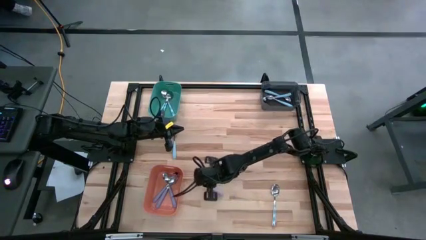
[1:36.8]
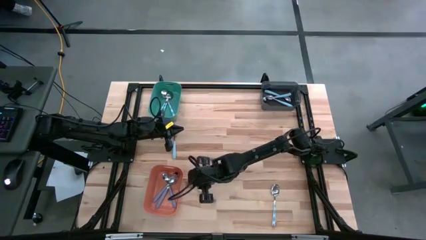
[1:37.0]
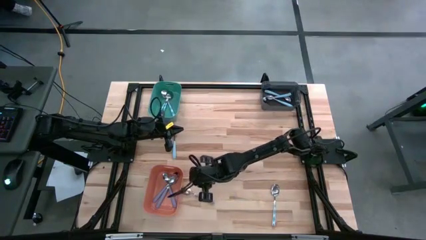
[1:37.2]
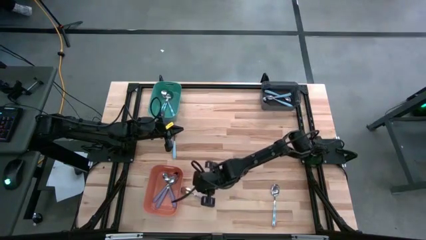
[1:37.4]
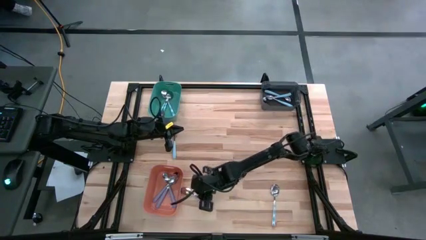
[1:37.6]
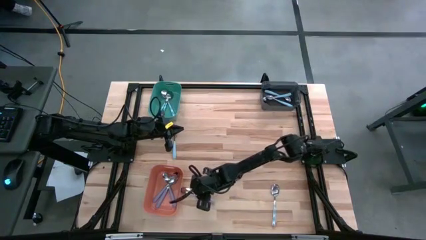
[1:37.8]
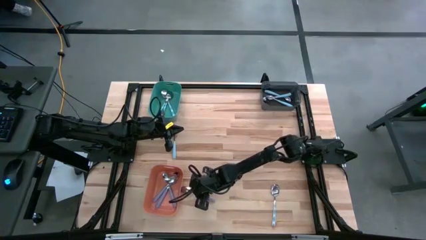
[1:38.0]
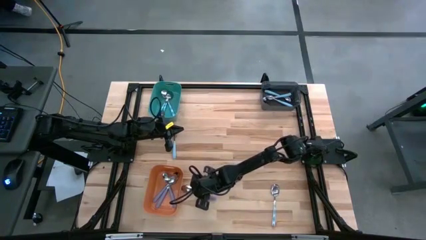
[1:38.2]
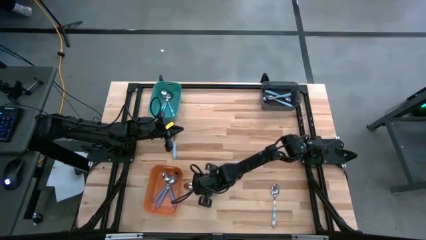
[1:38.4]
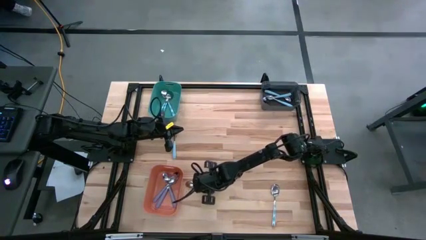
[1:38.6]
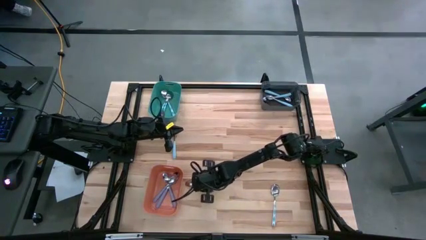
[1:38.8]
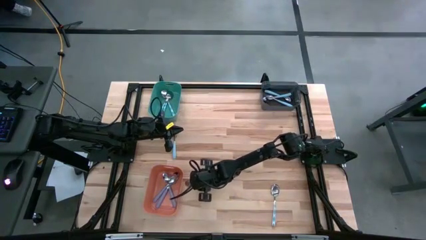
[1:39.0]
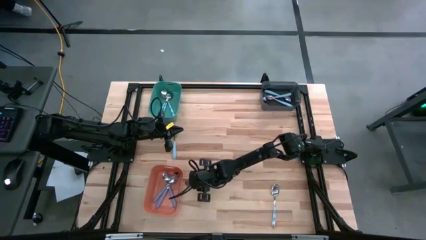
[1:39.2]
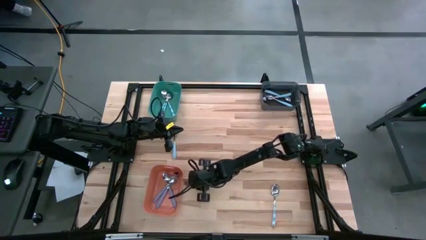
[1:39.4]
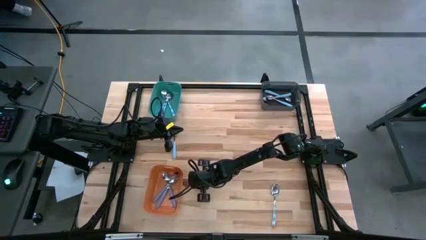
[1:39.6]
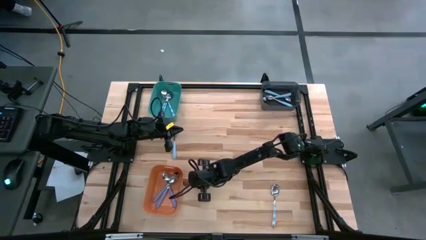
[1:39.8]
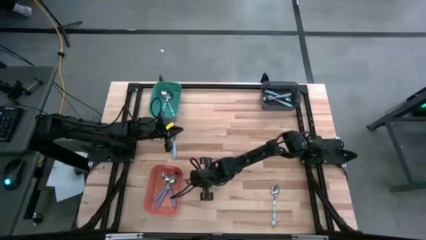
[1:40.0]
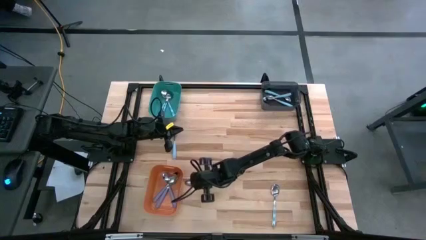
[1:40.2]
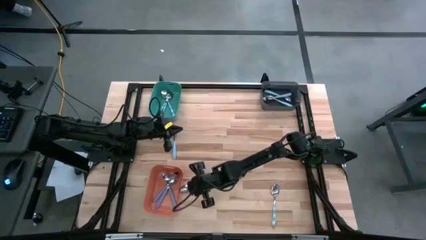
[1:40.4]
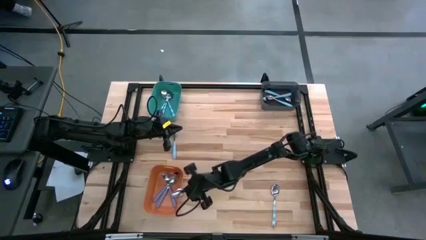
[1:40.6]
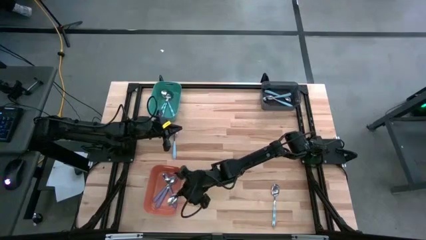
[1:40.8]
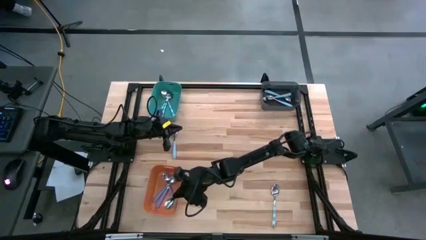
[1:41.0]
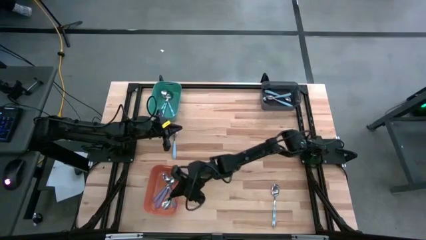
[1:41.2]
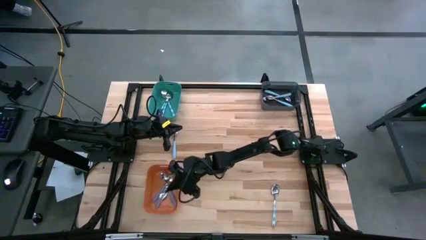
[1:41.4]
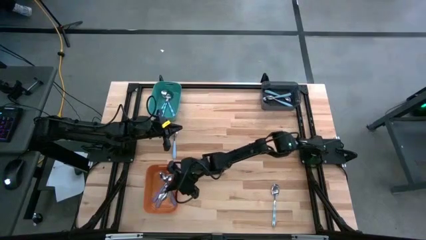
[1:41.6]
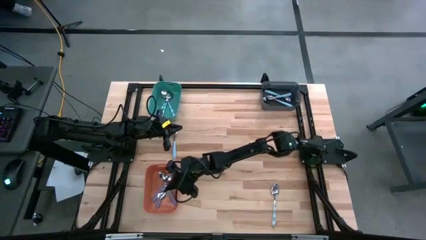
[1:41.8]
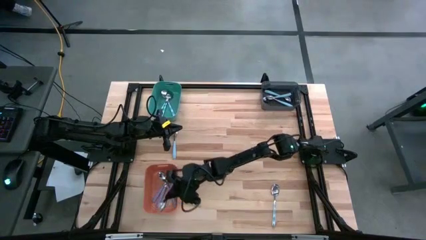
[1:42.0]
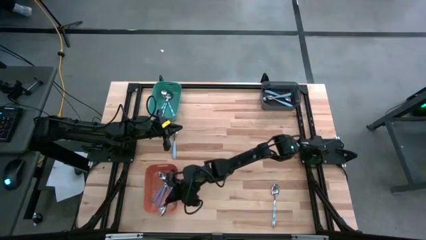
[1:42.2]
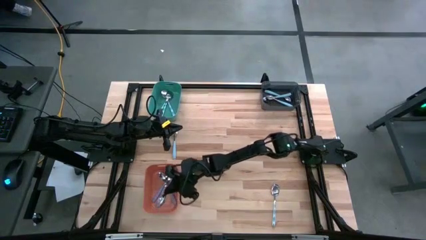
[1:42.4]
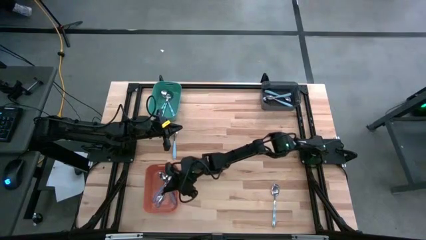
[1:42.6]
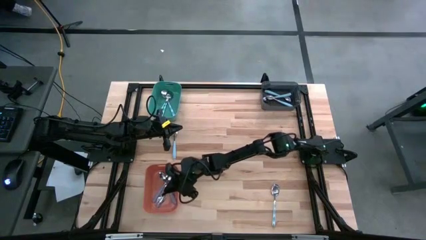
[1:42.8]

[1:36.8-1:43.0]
Task: Sort silverware by color (type)
Put the violet spoon into the orange bin

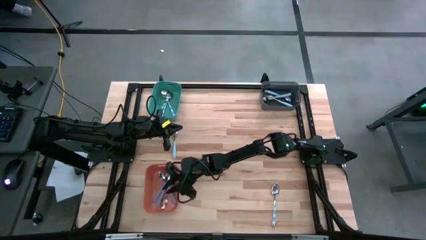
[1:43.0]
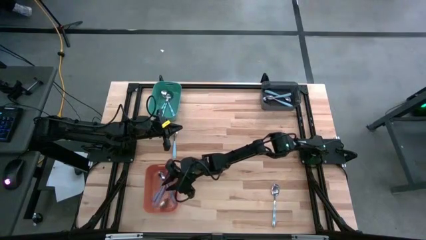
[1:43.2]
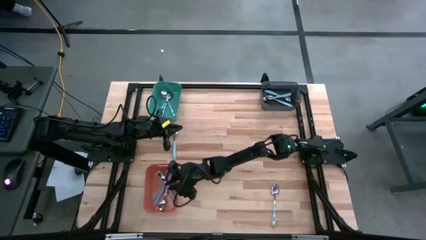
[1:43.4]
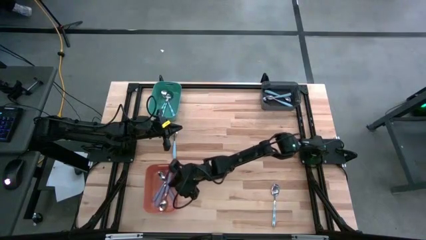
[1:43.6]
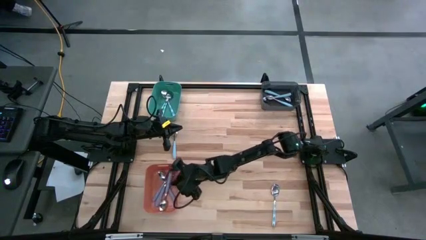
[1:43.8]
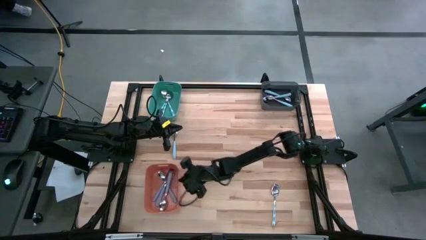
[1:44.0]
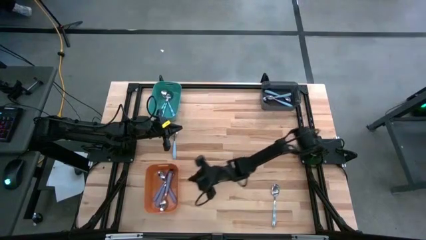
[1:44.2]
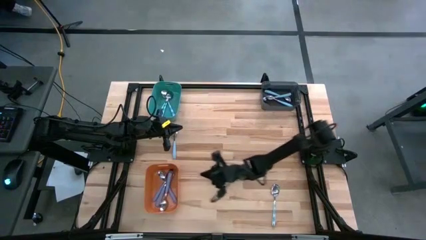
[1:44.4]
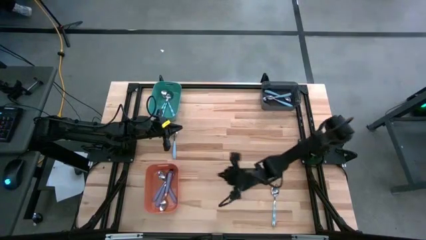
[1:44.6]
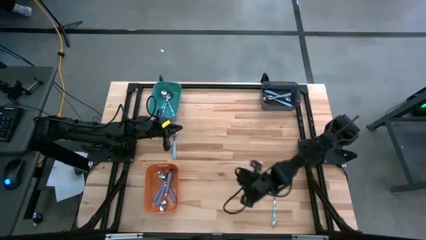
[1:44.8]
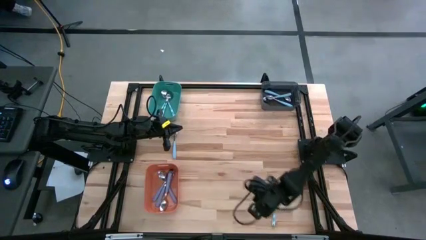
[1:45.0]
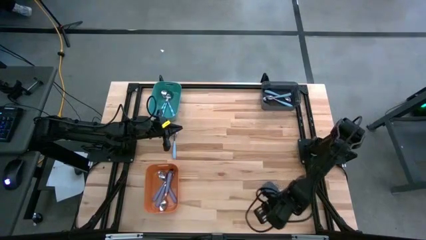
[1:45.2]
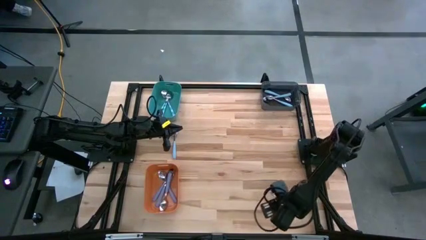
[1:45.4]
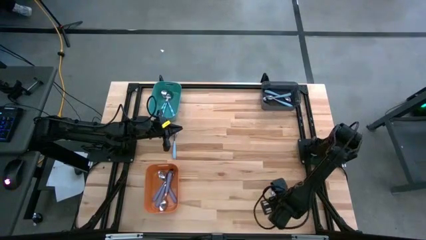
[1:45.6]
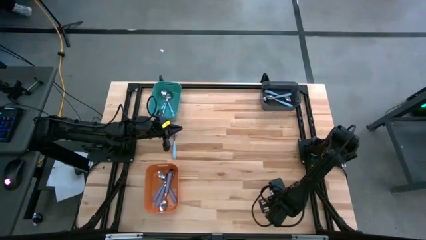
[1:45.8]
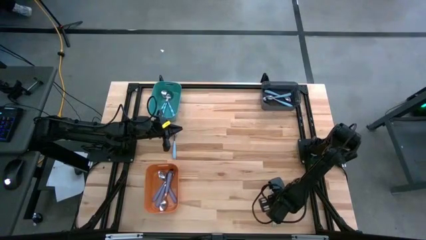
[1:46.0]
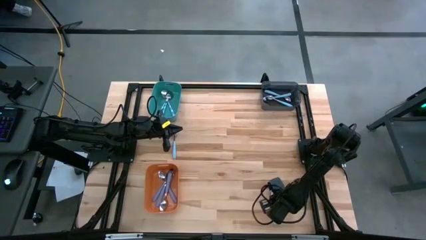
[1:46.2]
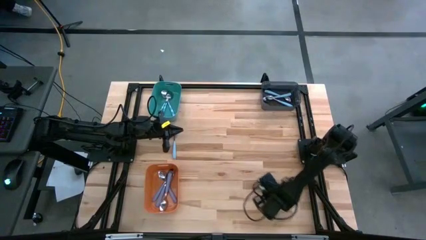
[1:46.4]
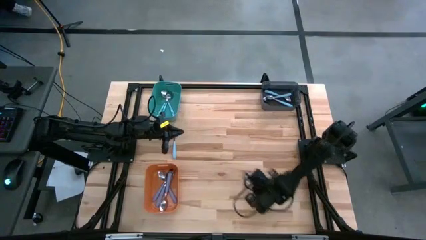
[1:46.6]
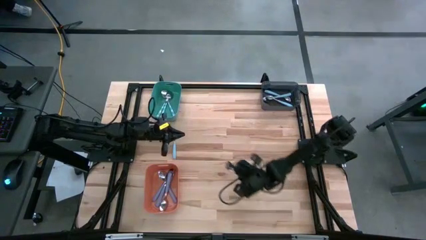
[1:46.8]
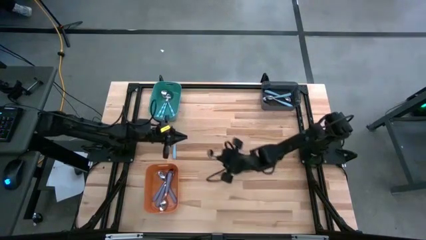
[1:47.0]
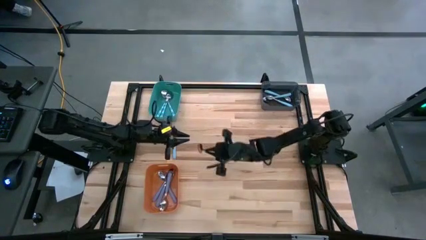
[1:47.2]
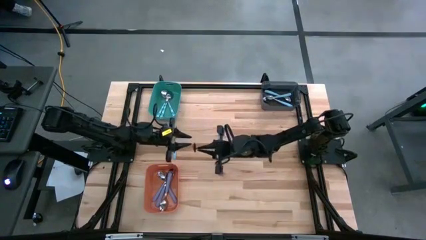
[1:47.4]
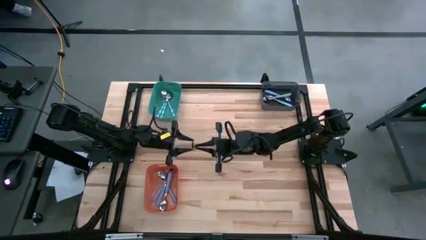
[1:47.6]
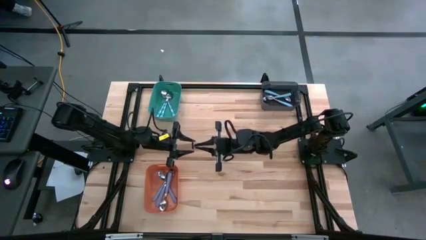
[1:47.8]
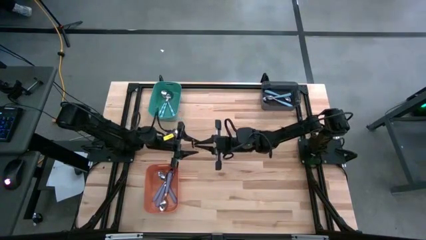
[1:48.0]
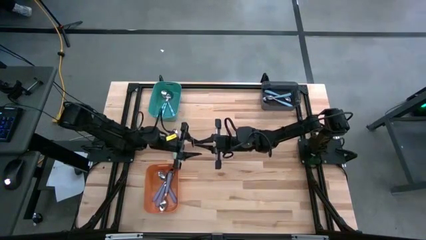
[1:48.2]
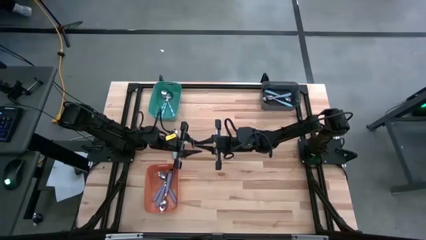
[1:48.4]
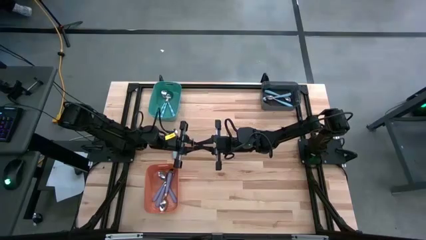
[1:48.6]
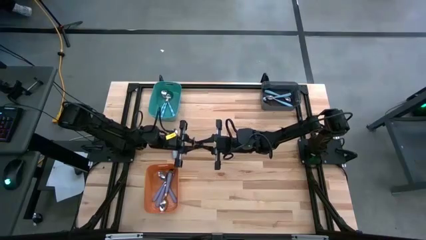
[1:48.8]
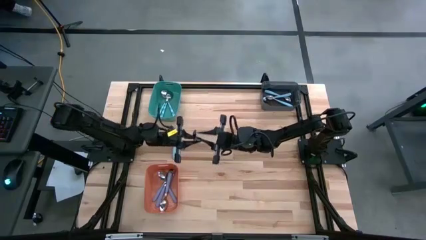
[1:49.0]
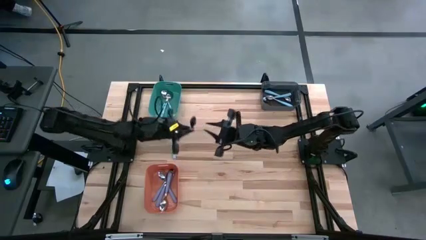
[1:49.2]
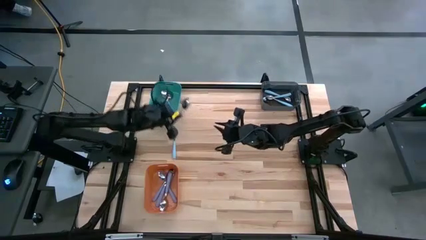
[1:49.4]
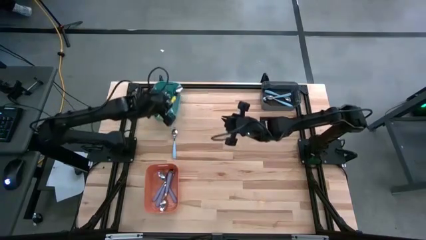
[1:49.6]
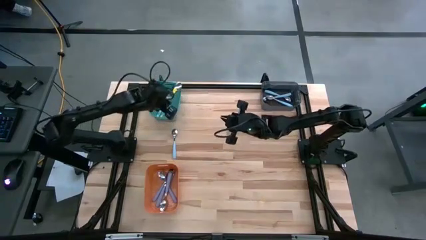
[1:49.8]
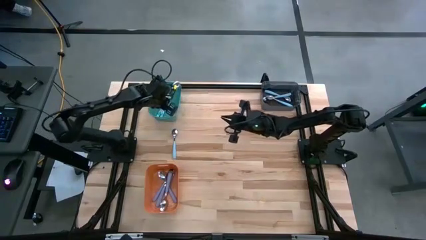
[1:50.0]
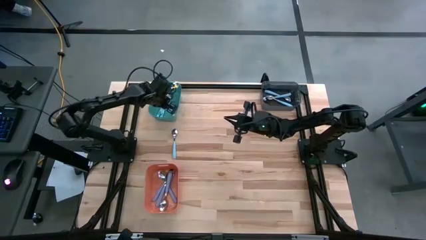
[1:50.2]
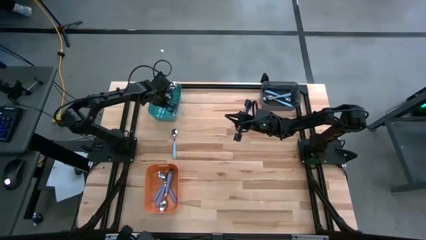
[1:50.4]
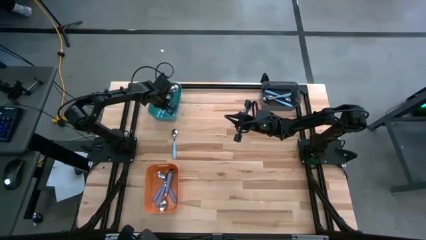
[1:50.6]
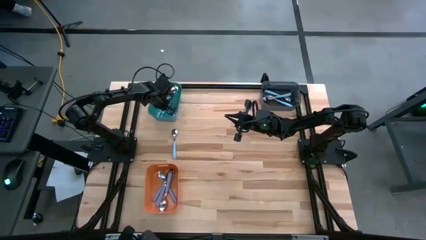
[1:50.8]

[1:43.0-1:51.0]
Put the blue spoon into the green bin

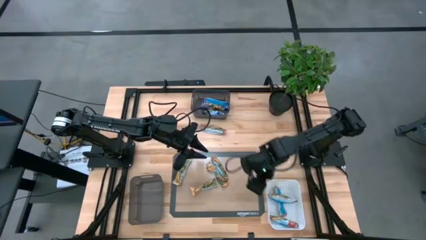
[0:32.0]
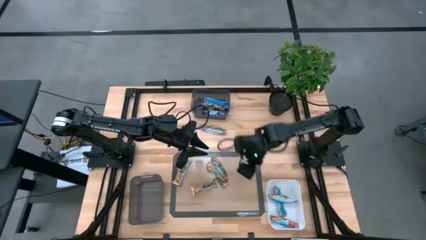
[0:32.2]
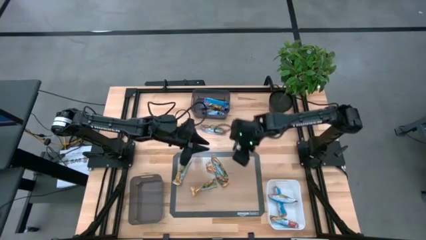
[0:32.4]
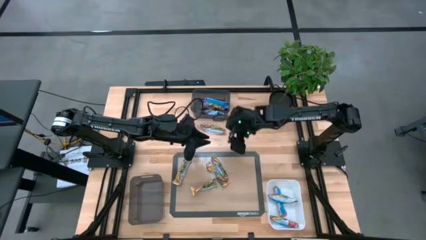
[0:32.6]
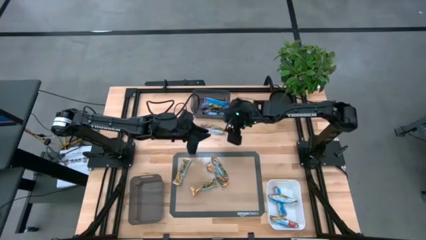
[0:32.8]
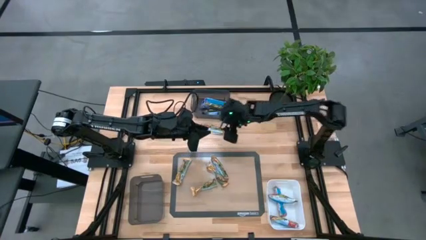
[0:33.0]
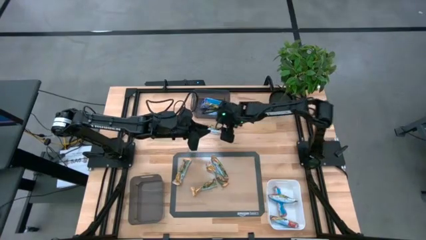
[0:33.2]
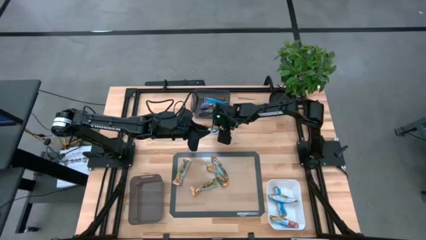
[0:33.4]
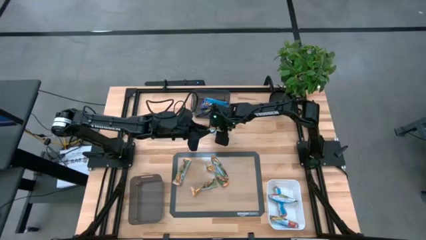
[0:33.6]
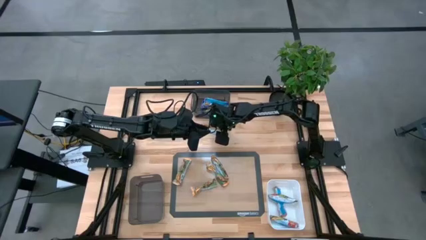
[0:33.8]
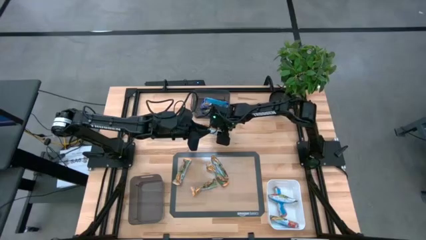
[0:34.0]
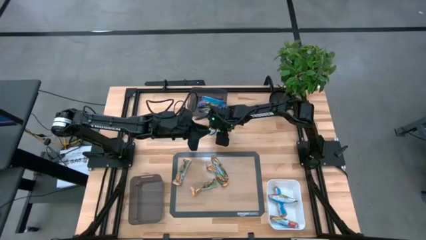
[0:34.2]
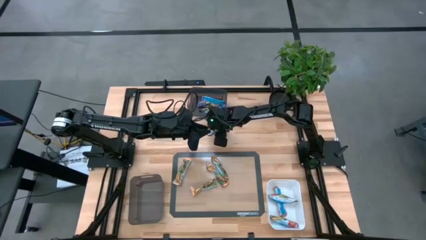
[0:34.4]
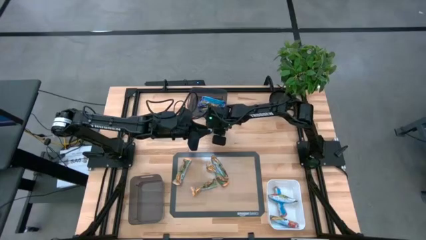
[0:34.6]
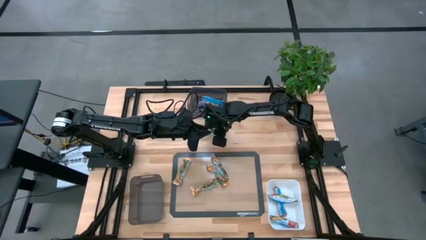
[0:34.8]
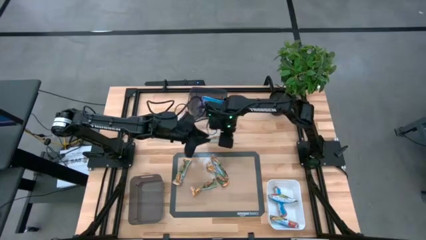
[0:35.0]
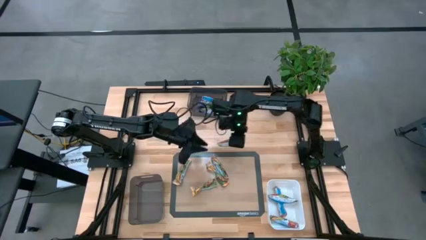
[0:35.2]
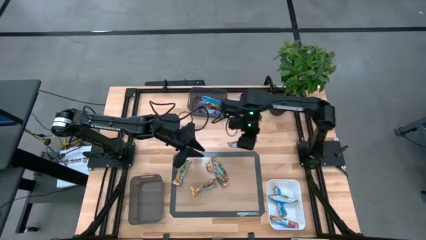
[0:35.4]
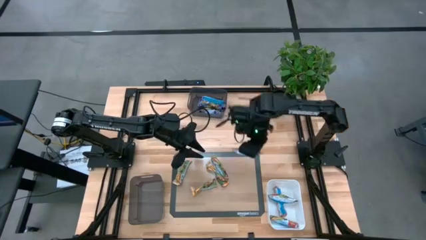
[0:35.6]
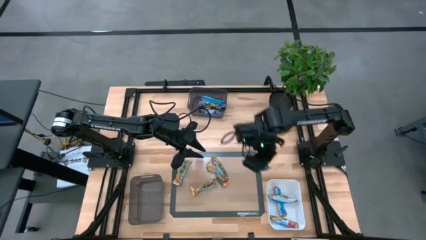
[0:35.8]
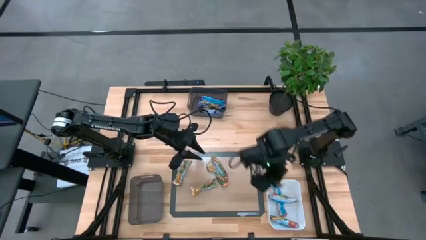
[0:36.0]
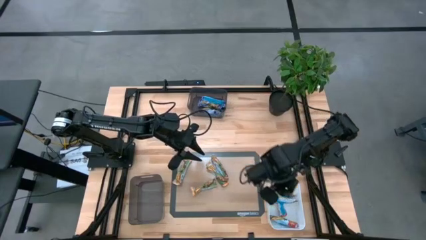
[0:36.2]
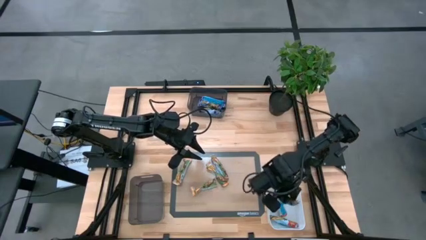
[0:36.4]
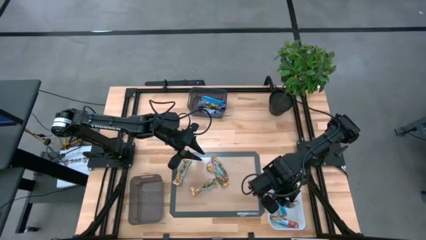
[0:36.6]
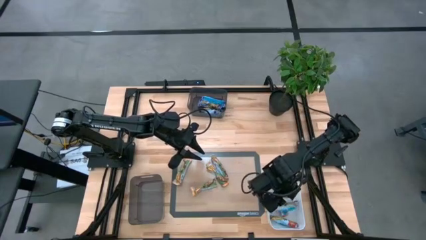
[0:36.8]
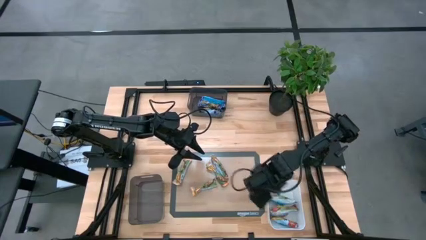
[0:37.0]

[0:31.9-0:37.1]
Task: Pick and place Granola Bars by type
Put the red snack bar into the white bin
